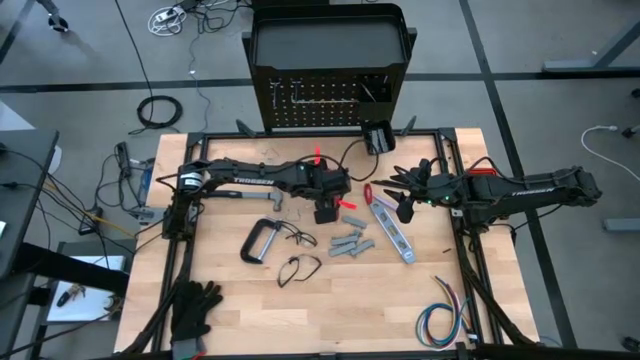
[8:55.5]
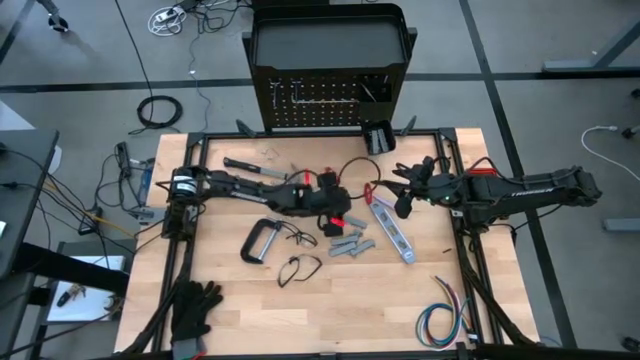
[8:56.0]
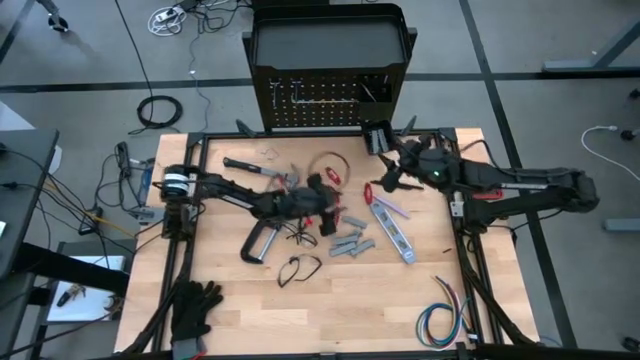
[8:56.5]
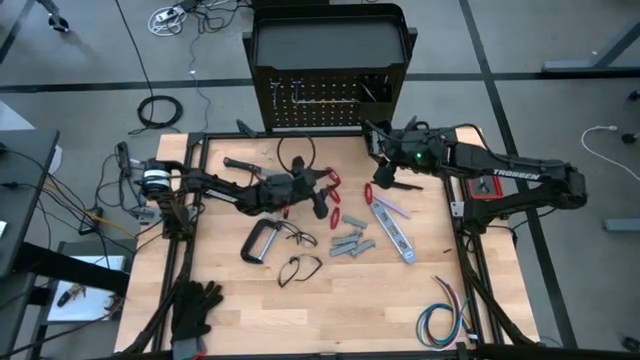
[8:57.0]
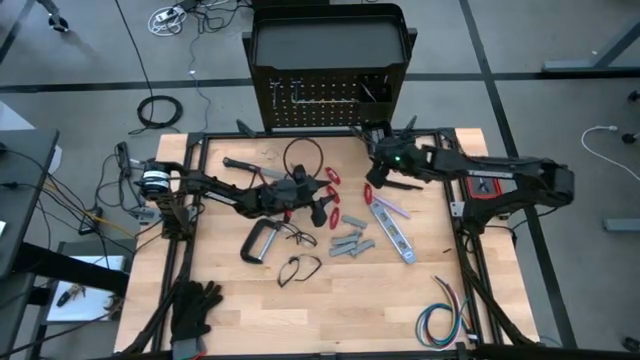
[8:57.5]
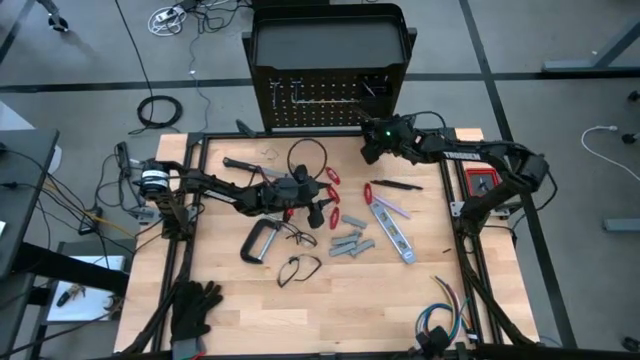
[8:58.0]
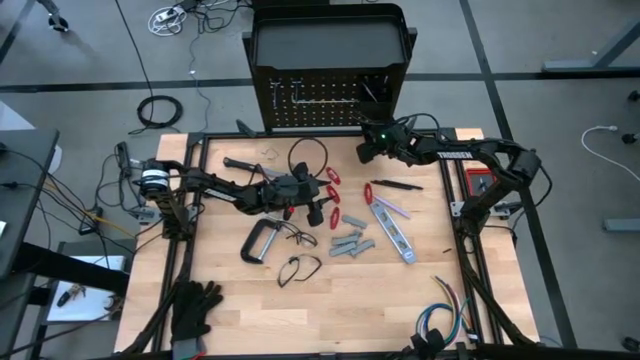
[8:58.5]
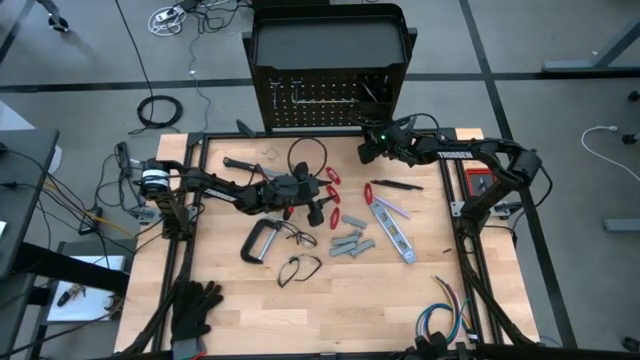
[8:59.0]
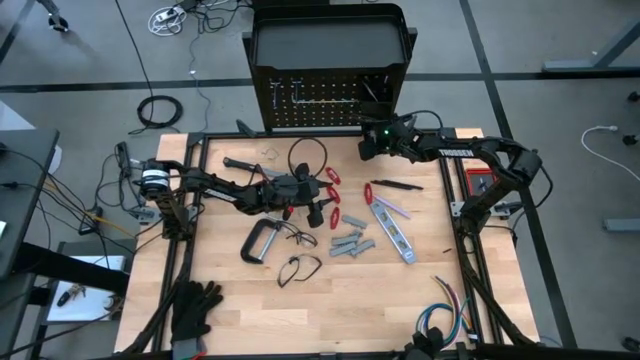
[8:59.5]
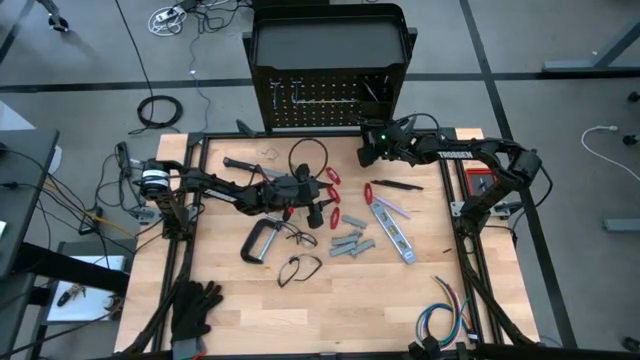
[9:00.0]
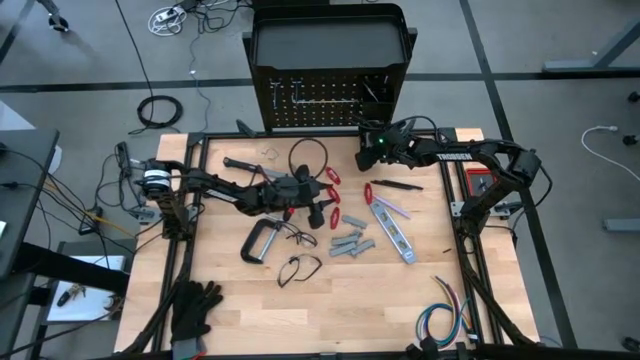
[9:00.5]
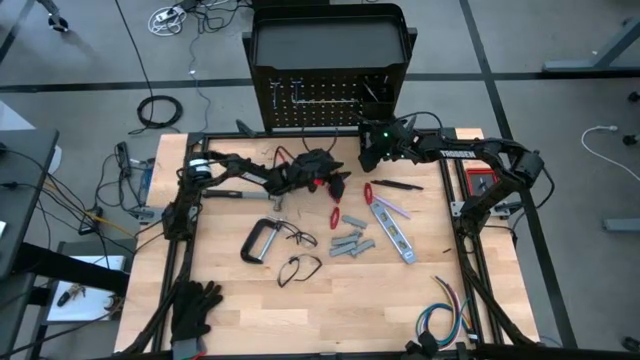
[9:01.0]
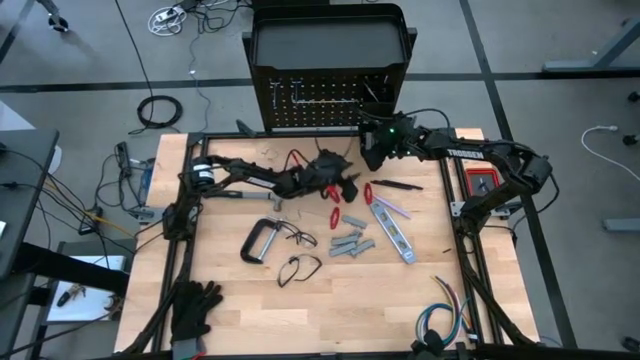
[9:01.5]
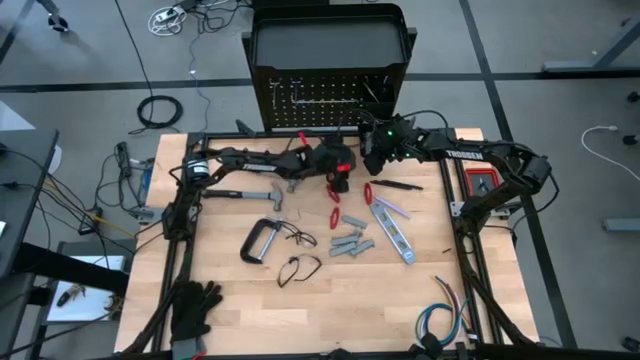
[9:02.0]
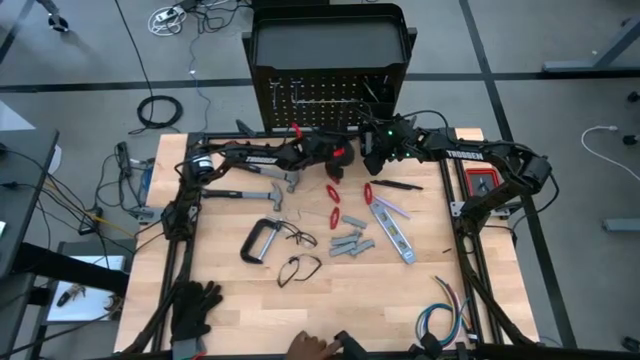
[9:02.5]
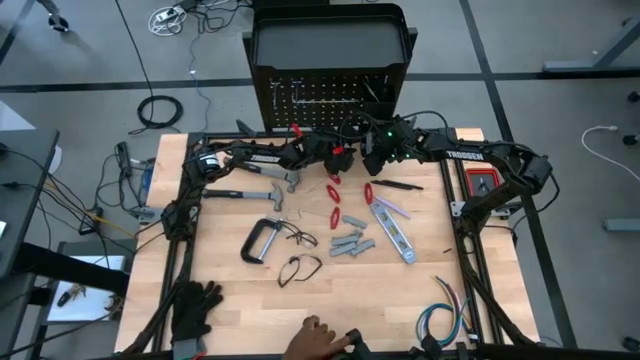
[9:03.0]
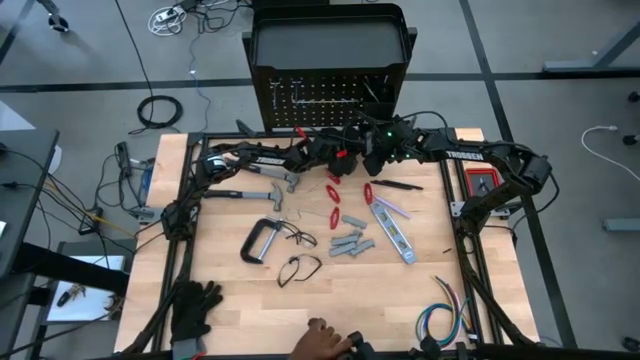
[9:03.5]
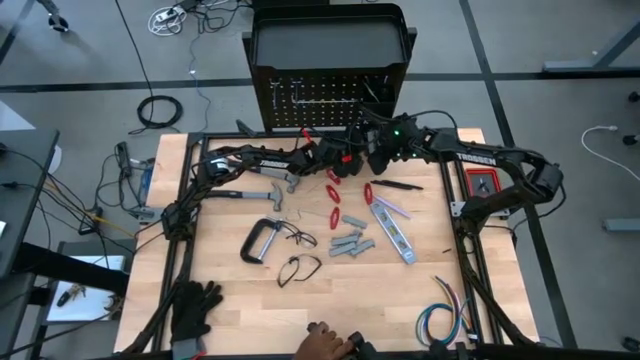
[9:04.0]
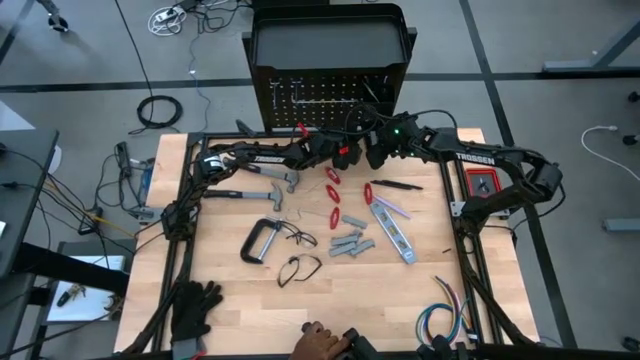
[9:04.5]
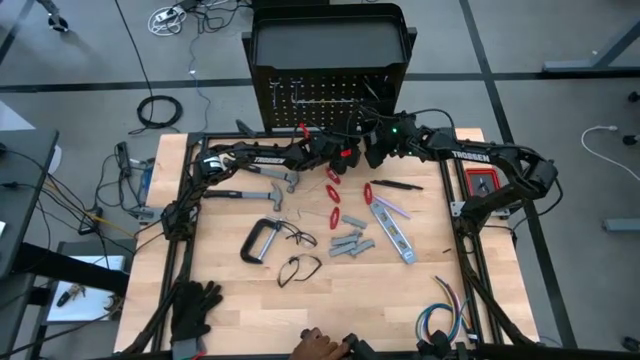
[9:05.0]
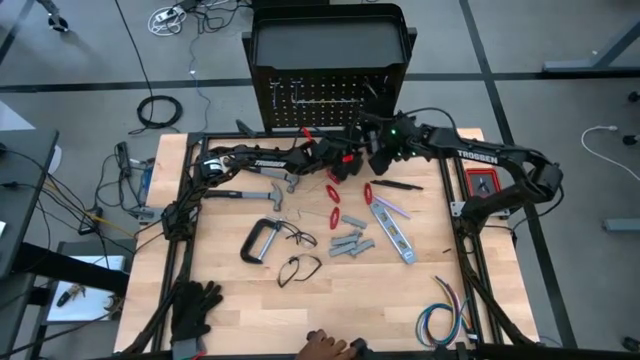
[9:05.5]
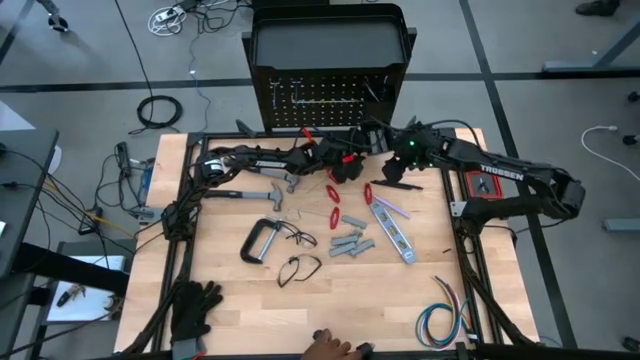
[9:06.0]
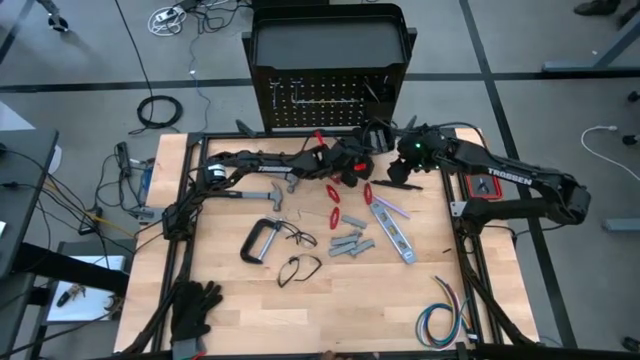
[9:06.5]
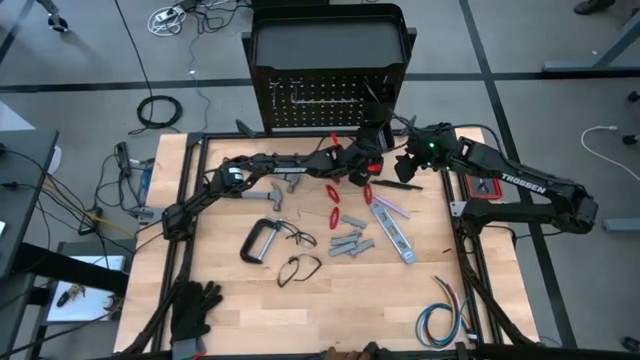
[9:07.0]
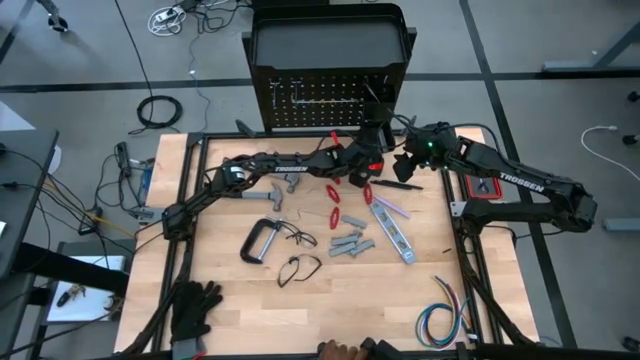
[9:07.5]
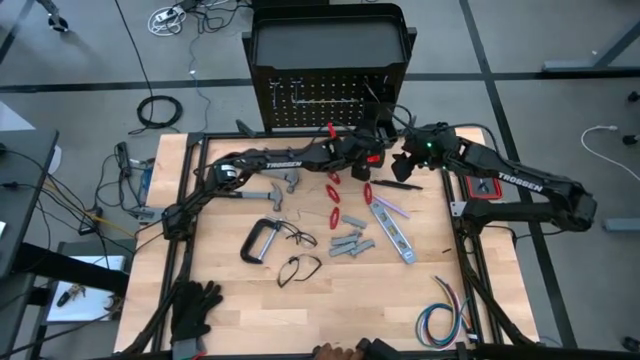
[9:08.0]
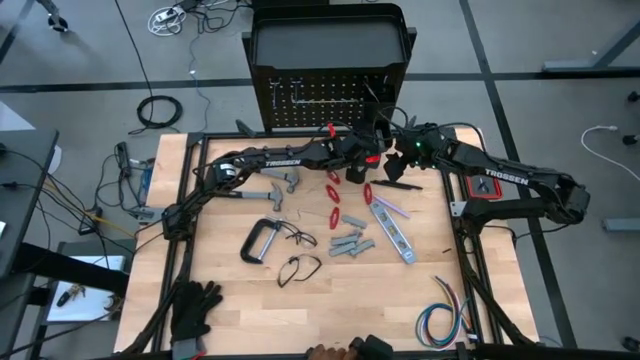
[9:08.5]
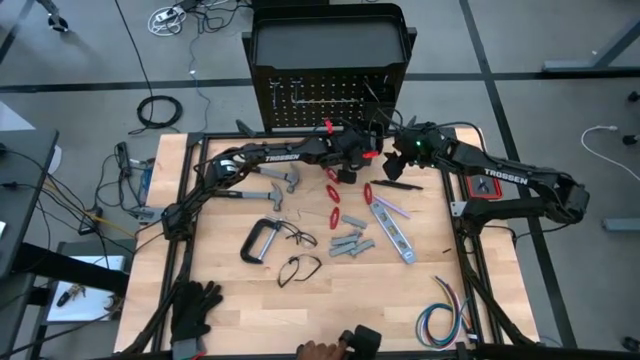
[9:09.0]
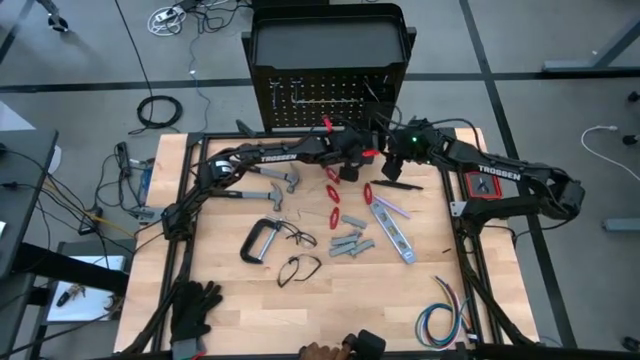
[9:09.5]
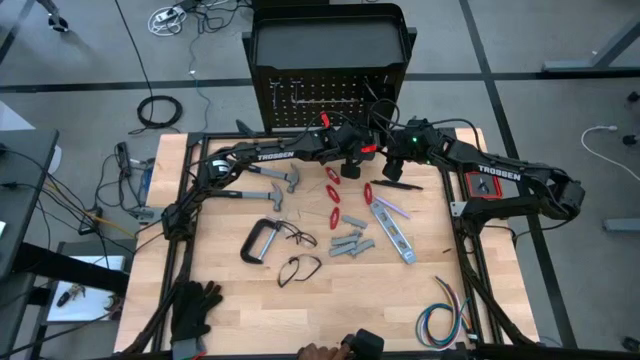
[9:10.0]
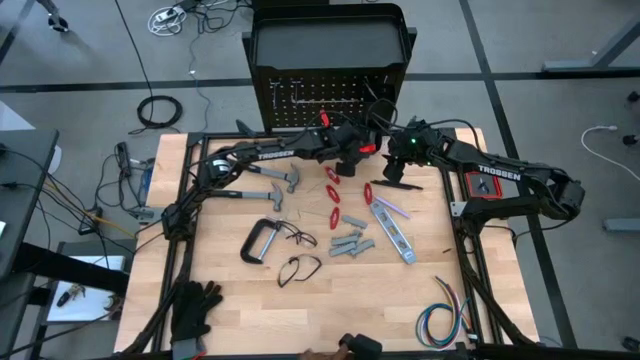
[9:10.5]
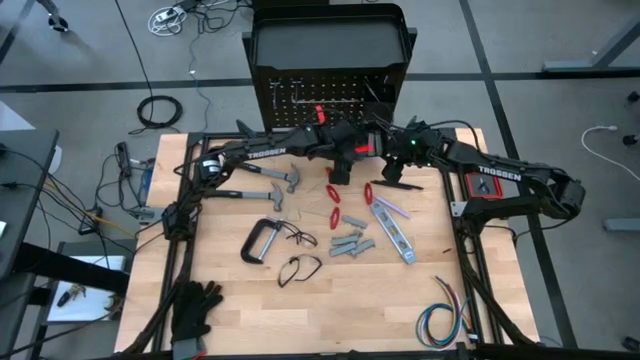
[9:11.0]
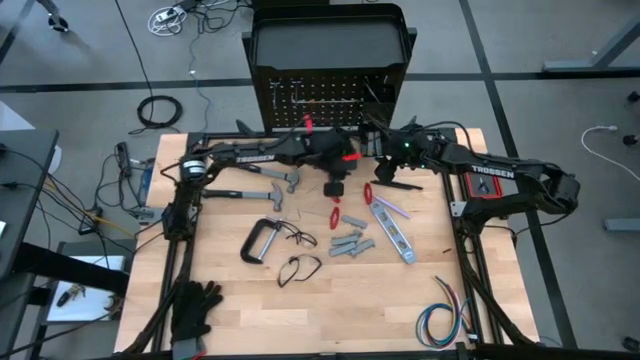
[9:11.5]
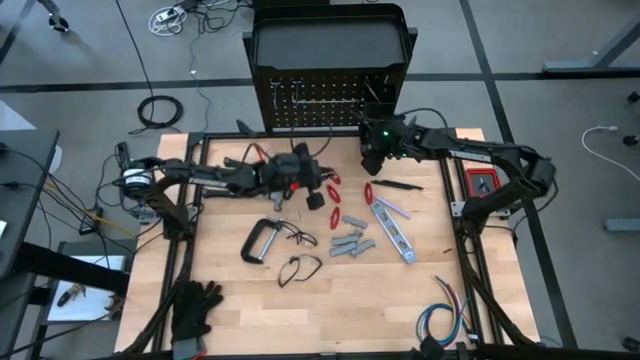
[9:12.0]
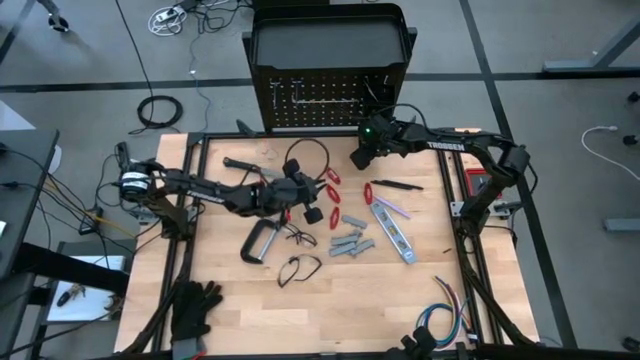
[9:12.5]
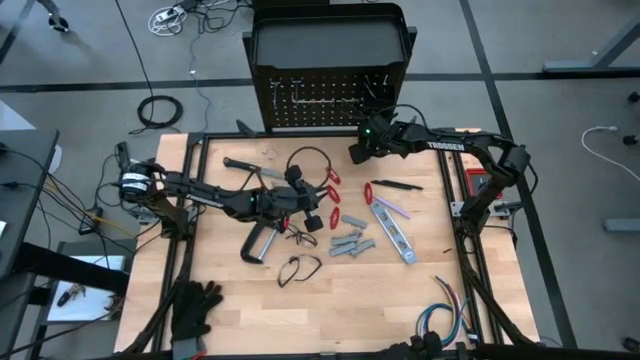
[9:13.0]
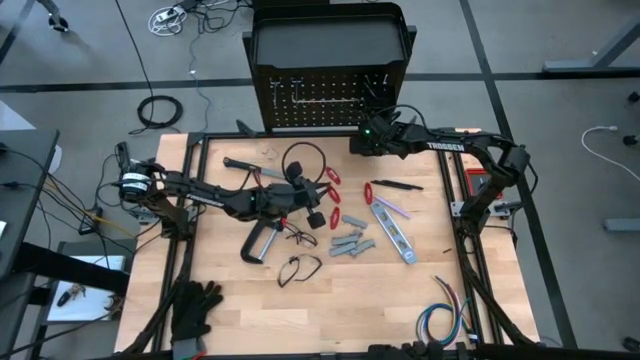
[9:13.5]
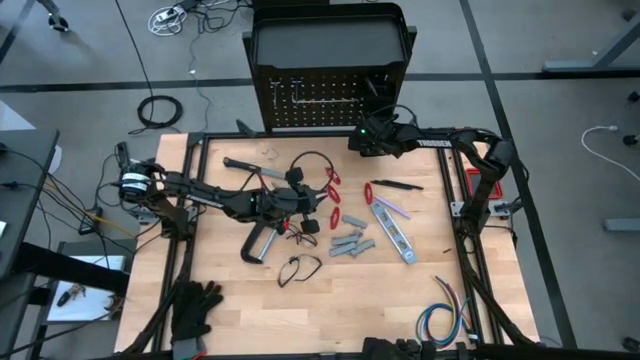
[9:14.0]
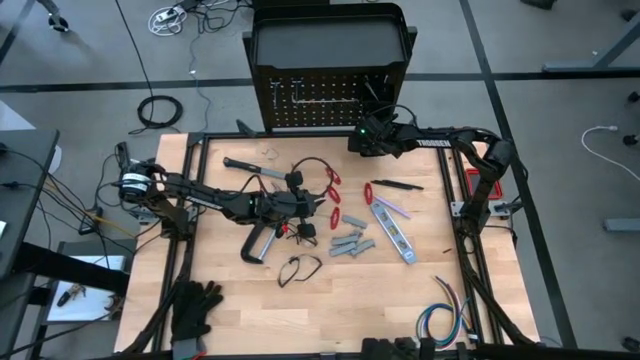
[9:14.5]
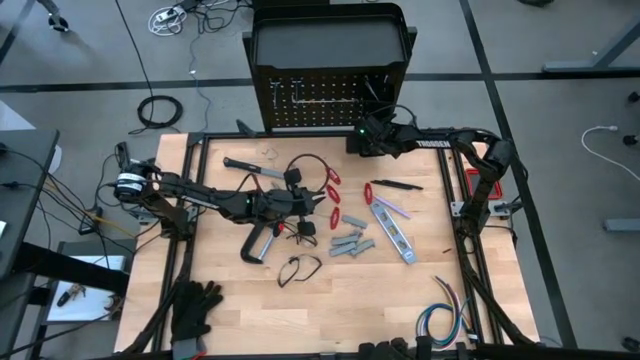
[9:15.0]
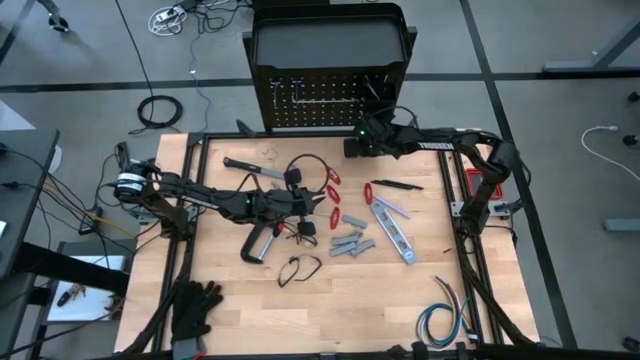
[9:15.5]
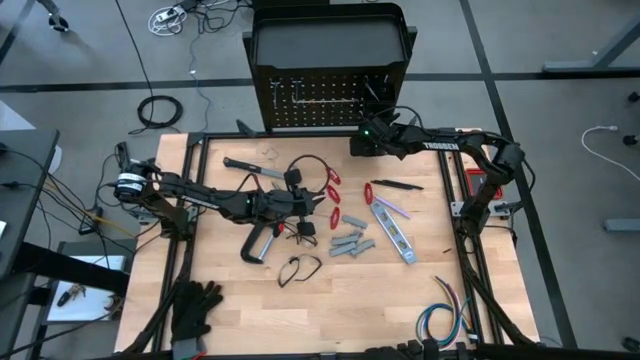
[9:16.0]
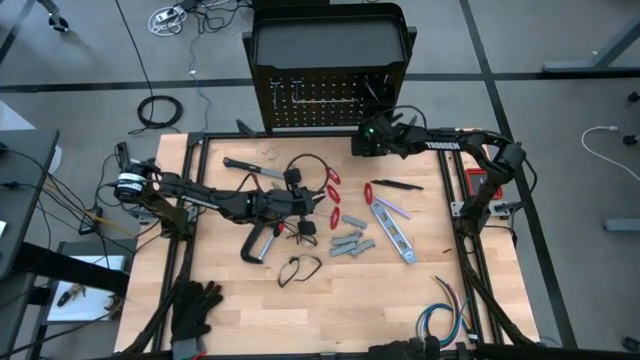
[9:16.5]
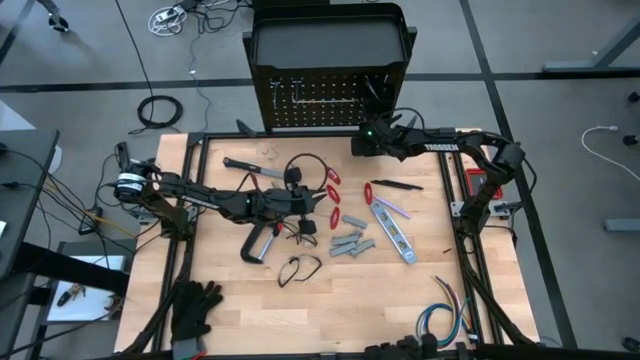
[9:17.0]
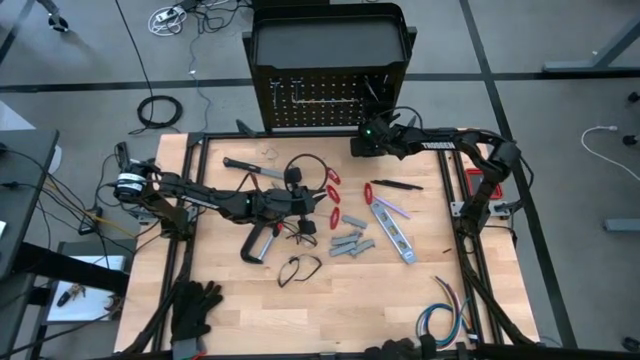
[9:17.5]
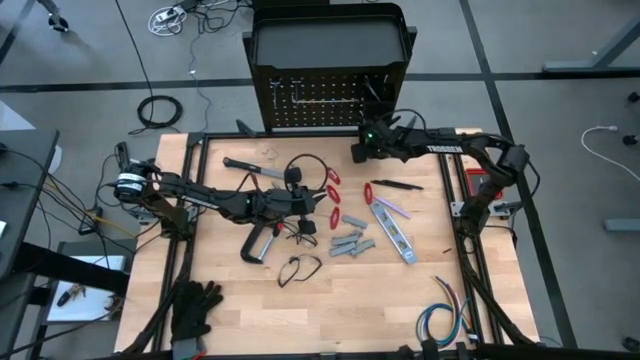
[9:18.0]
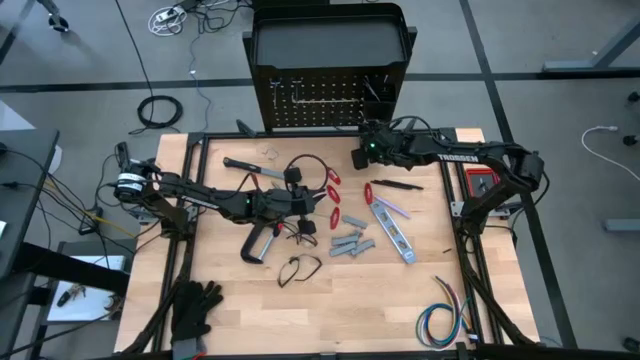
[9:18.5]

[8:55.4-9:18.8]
Task: Hang tools onto peg board
Put the screwdriver bits on the table
